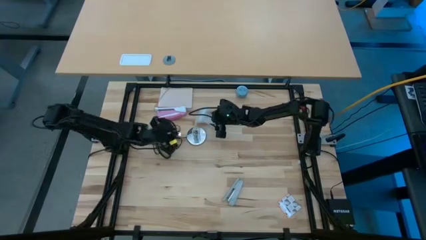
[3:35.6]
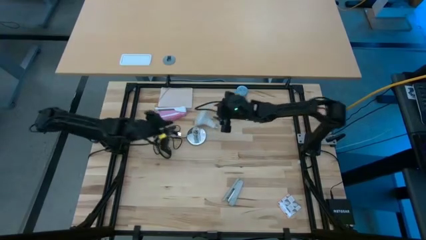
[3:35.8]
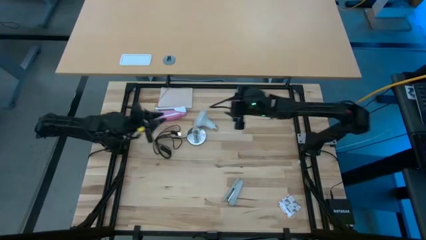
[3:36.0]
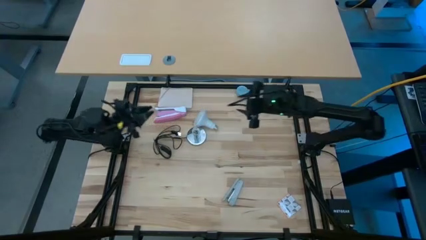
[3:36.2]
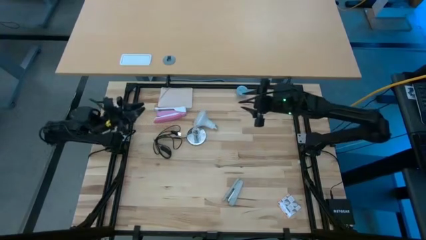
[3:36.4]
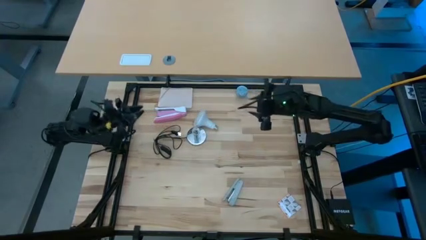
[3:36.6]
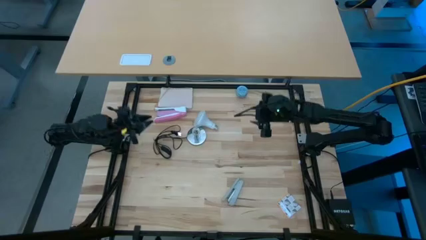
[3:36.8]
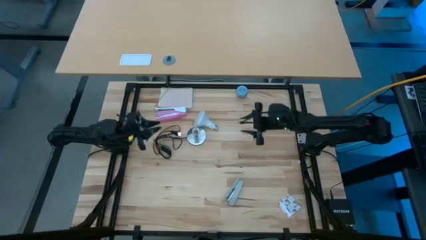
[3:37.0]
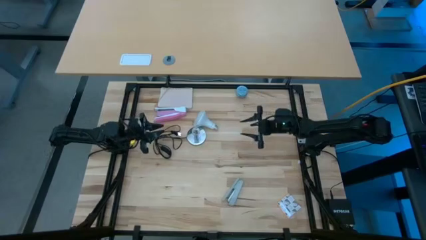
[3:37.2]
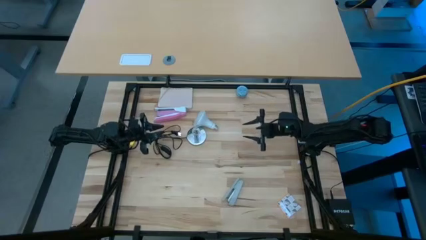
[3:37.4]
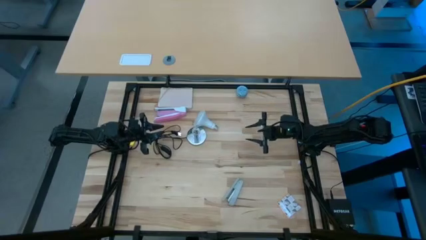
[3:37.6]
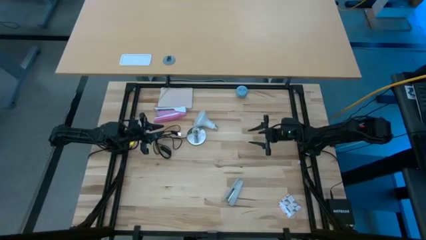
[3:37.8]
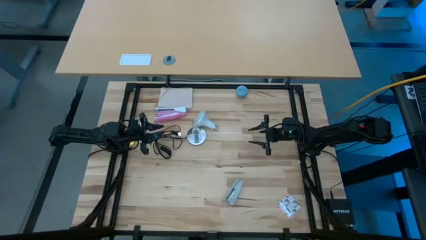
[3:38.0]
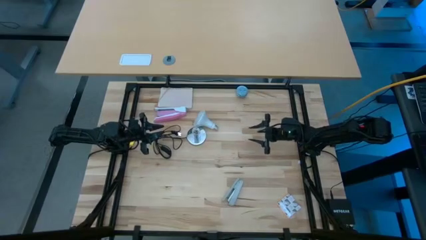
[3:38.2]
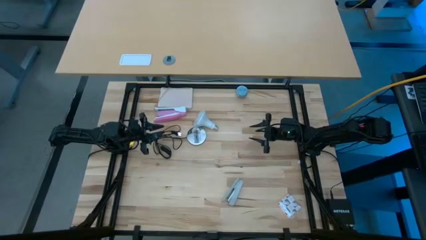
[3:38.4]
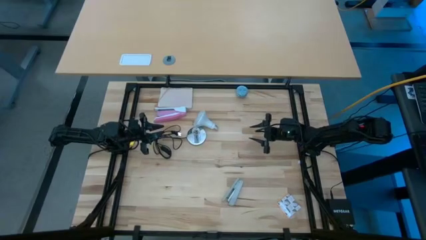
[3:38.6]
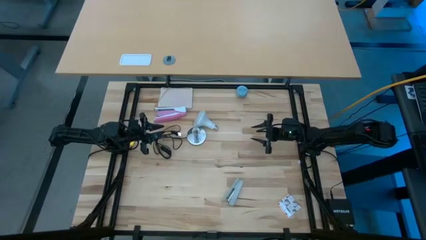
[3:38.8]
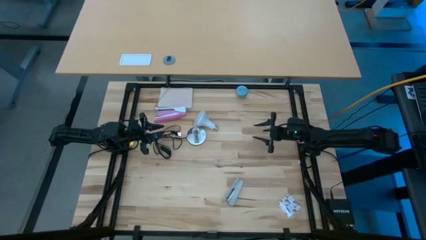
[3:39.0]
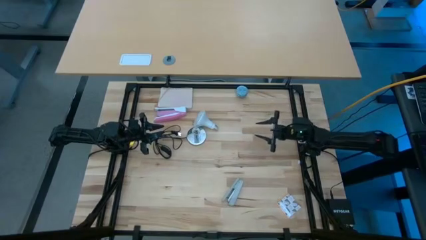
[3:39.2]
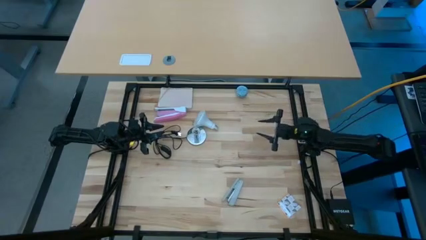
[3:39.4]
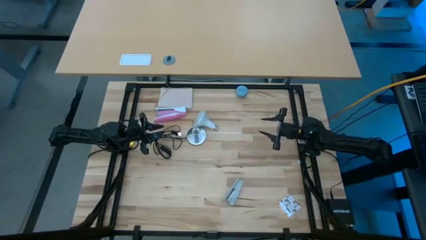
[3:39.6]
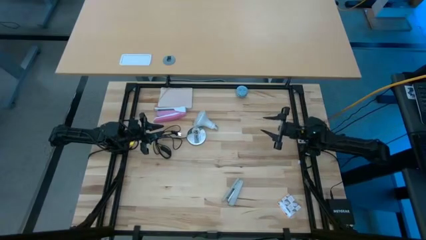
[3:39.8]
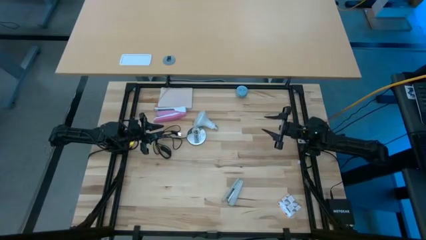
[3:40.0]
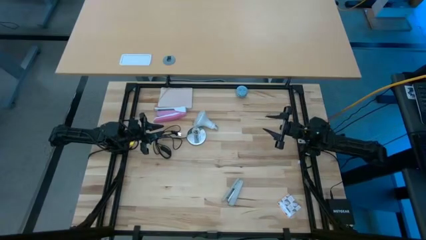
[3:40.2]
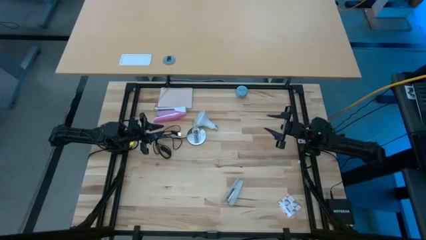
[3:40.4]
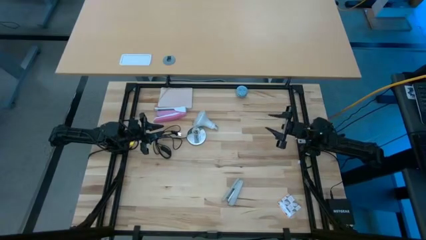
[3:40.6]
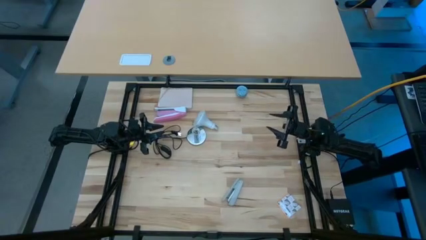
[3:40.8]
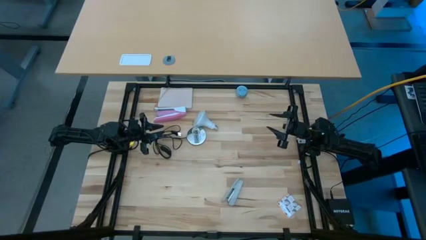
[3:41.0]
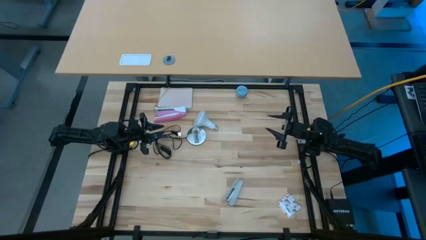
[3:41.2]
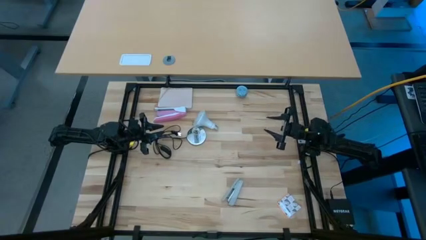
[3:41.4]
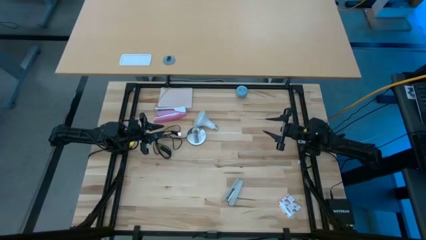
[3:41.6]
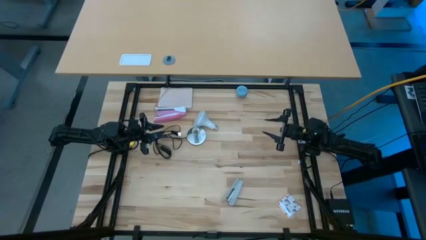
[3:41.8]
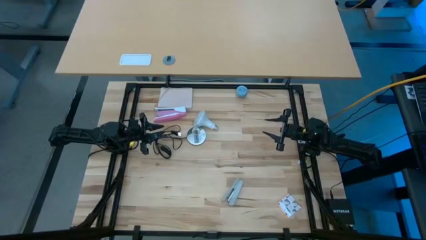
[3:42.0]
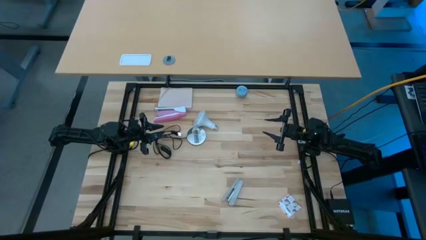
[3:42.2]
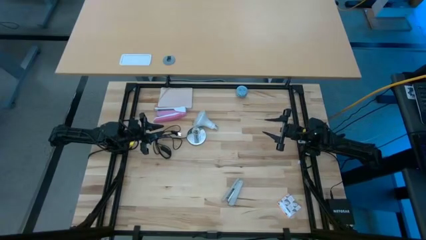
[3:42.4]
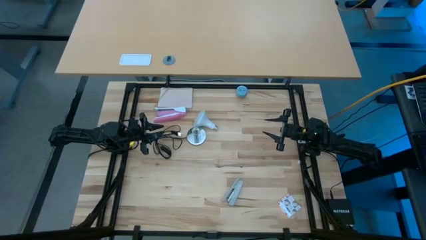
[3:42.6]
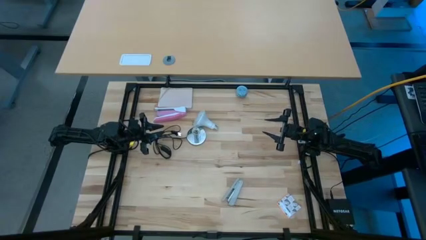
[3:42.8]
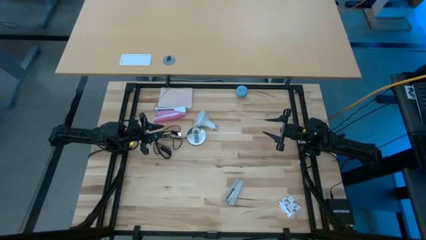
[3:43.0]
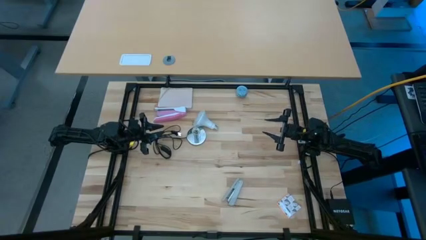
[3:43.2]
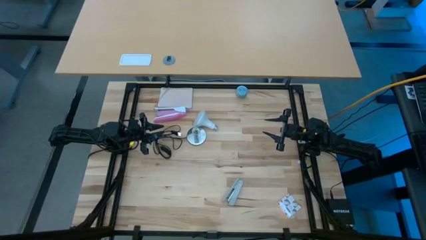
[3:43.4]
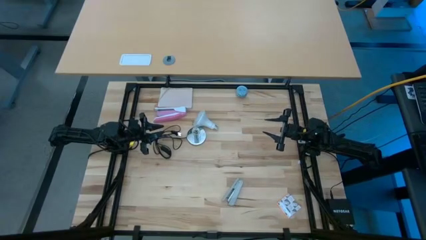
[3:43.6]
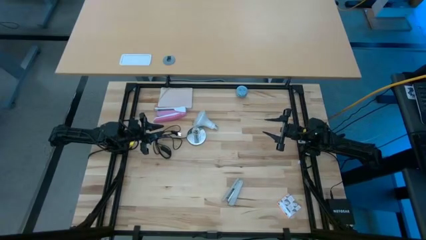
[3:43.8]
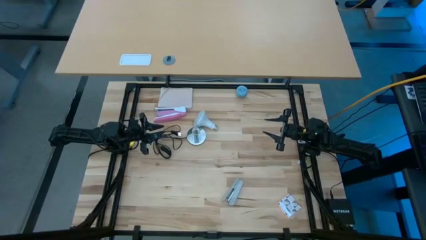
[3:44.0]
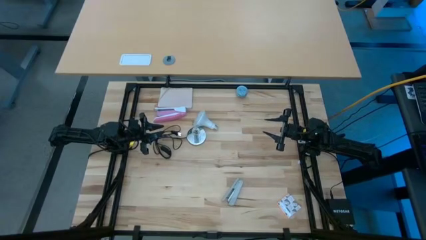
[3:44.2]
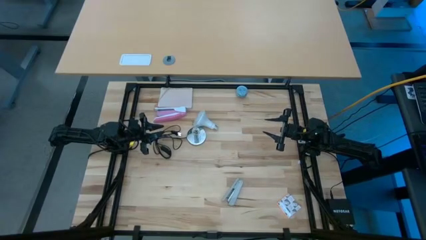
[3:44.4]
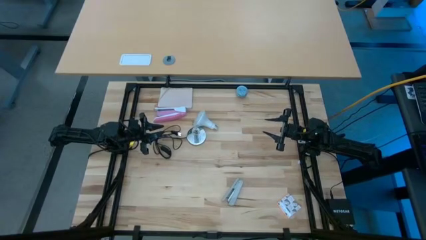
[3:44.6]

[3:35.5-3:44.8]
Task: Screw lightbulb
Return to Home Position

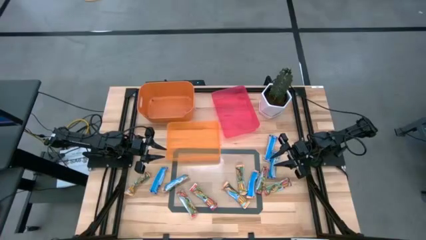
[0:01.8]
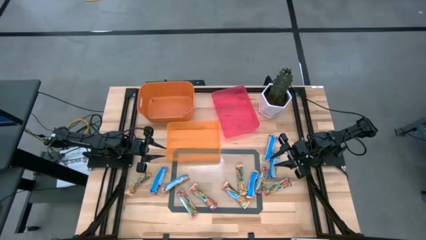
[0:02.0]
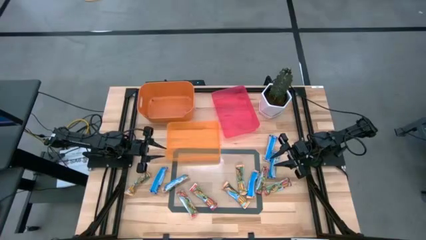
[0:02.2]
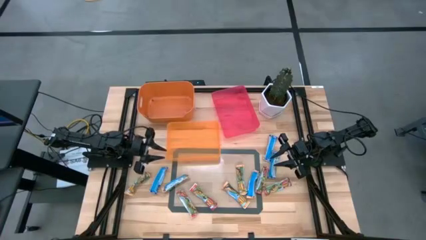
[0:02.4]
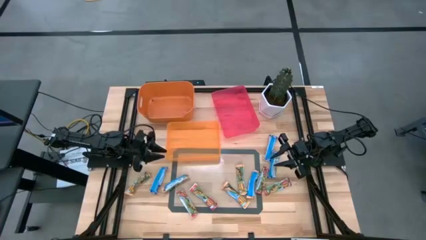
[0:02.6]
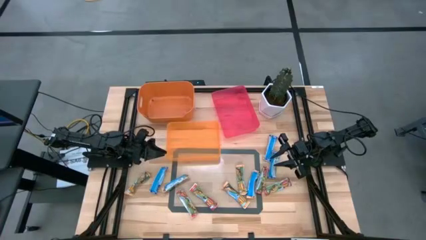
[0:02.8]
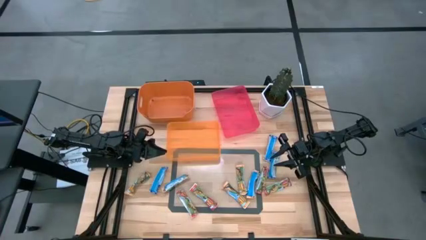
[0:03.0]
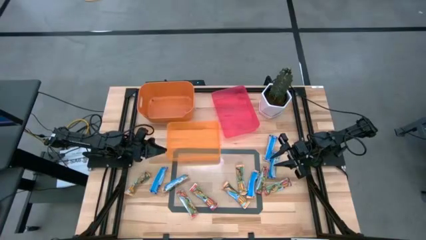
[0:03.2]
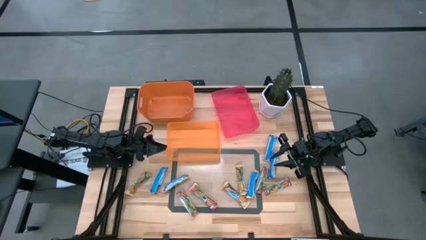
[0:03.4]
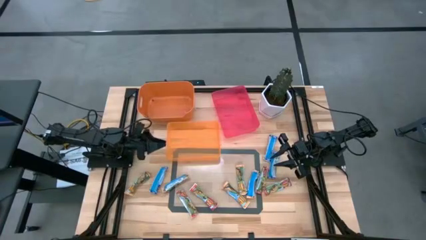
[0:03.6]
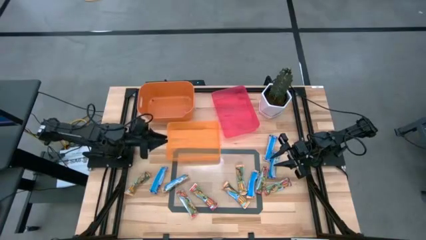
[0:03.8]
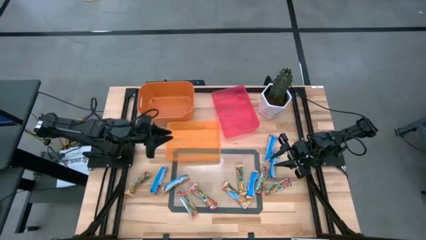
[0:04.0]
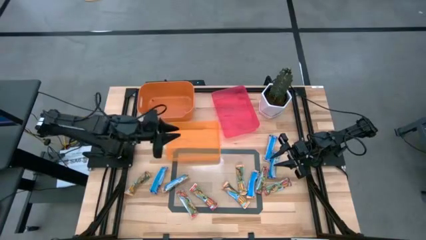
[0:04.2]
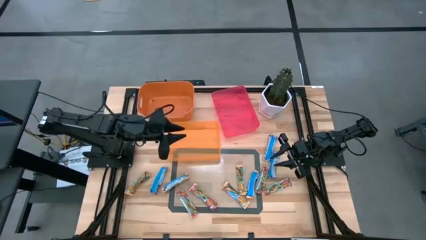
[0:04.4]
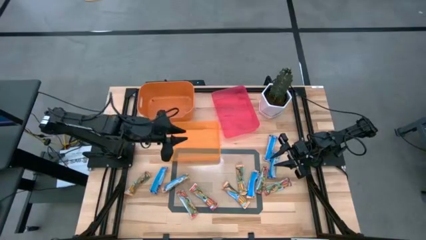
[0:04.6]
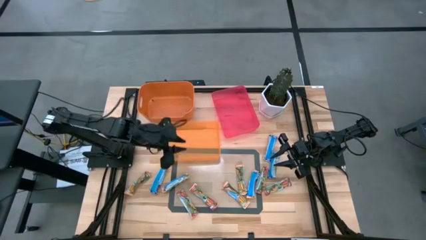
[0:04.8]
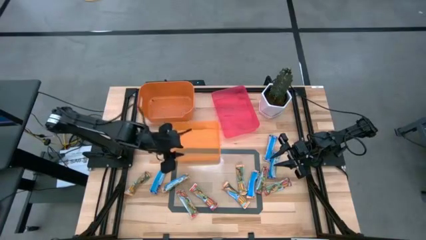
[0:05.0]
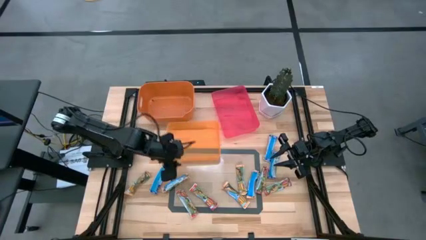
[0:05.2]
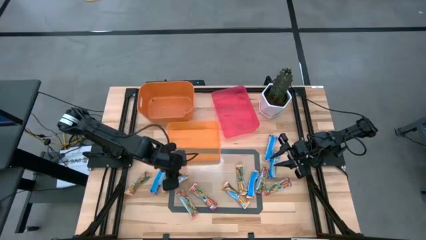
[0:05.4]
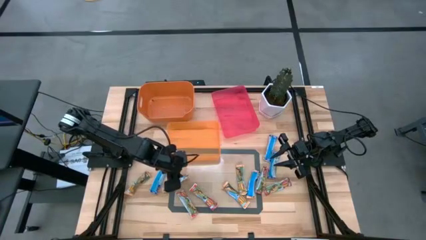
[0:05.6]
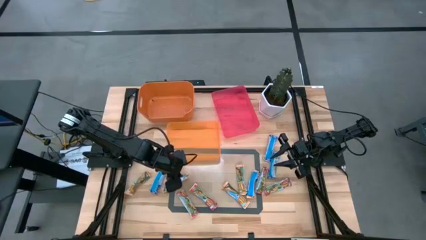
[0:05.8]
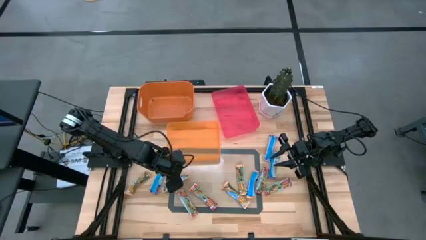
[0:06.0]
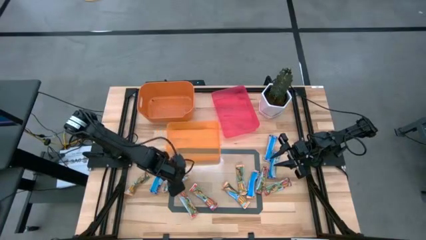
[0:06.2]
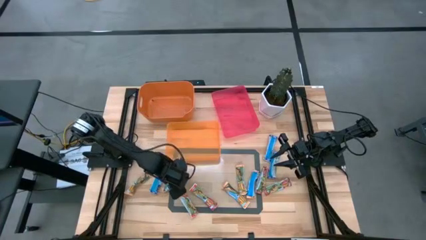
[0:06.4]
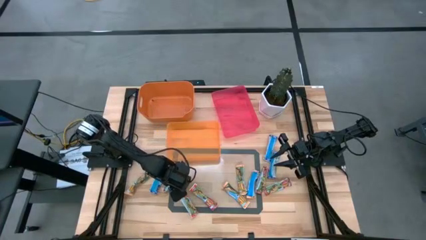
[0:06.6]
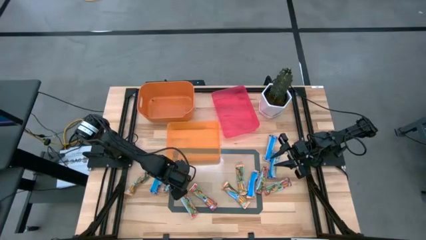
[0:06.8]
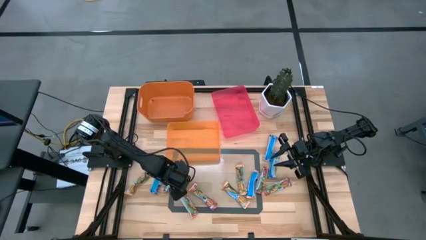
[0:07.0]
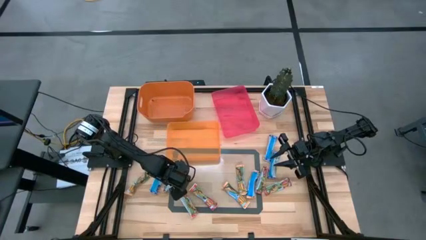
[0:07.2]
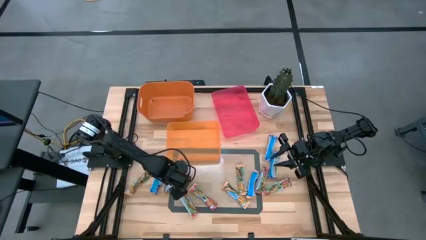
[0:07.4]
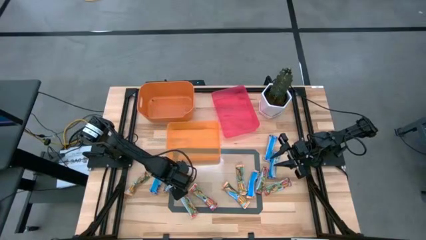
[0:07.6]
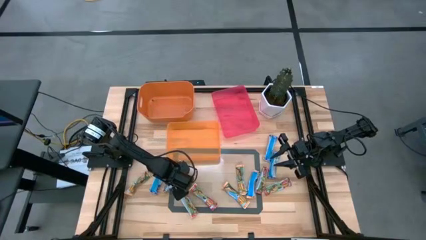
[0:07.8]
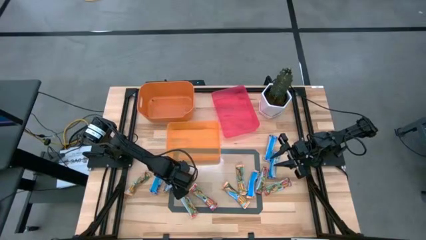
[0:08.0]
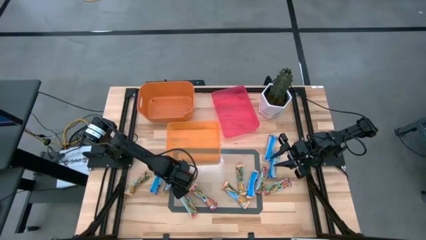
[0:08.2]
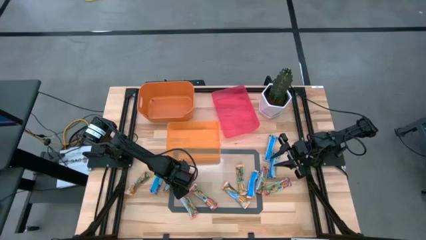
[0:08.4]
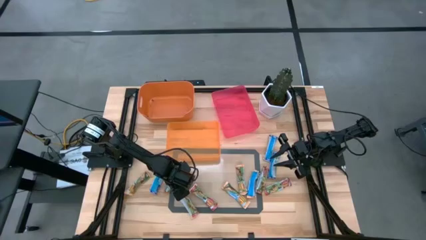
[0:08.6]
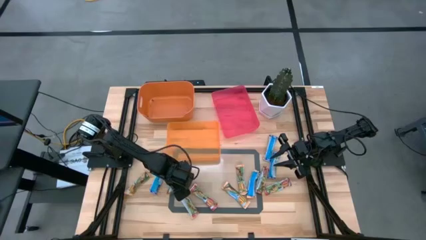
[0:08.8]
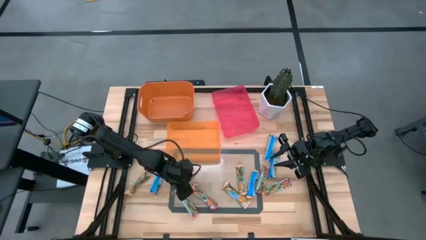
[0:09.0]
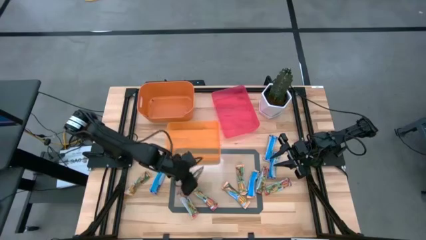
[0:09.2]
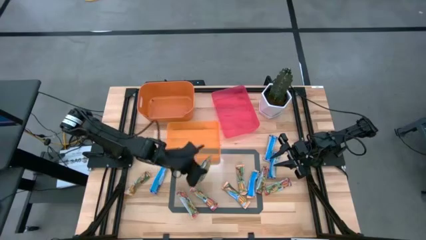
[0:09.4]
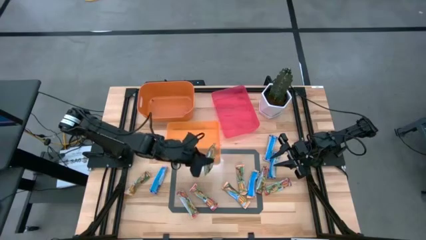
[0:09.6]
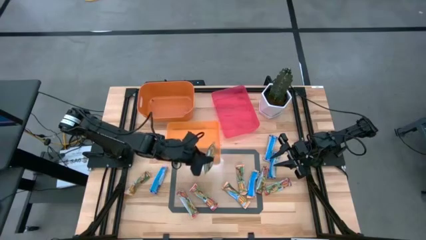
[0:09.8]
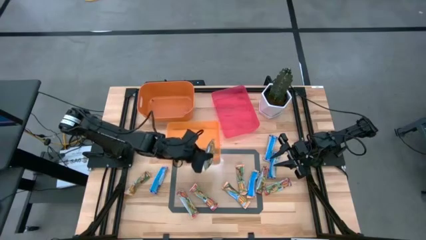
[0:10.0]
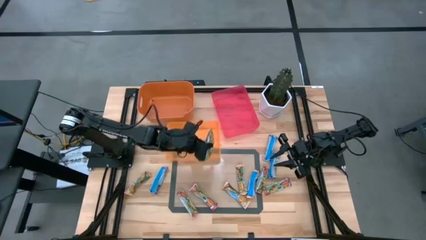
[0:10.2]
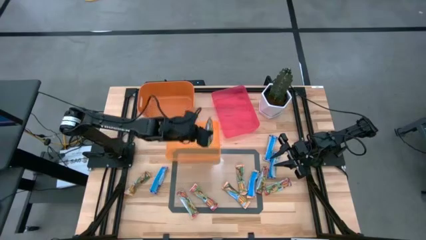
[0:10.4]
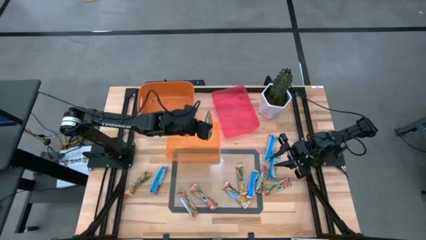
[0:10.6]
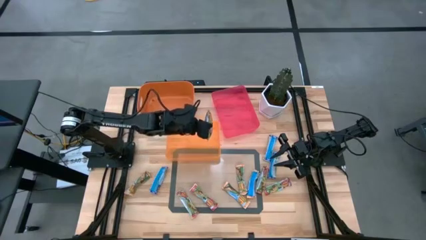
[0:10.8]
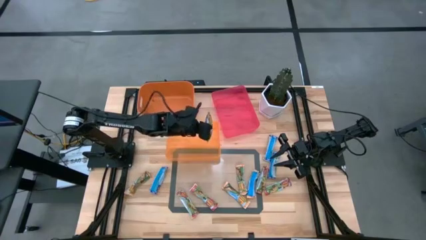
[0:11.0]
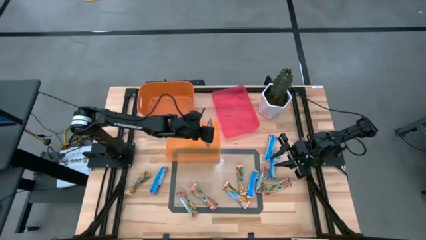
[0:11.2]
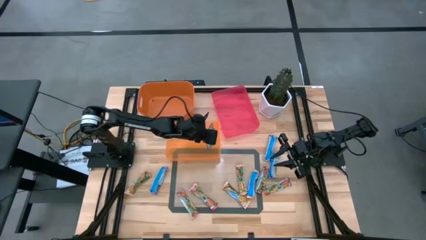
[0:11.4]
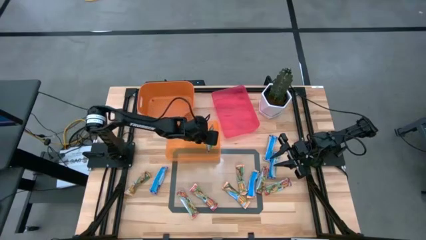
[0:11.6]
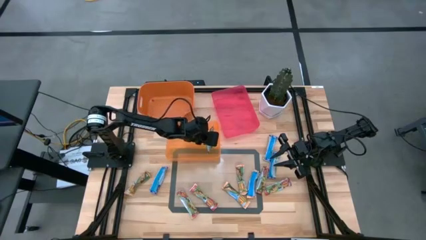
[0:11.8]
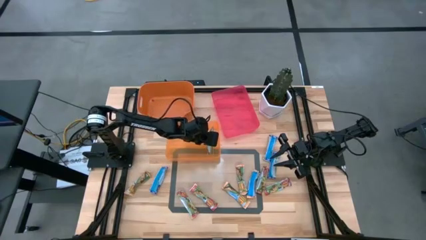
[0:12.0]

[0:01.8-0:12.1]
Task: Pick and place Granola Bars by type
Put the yellow granola bar into the bottom orange bin
